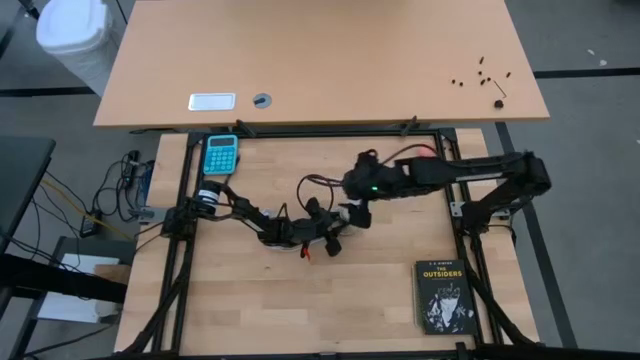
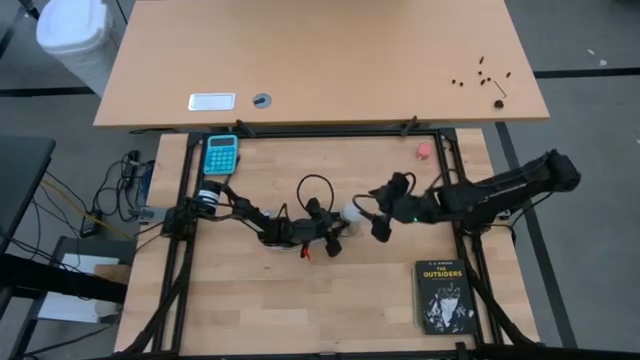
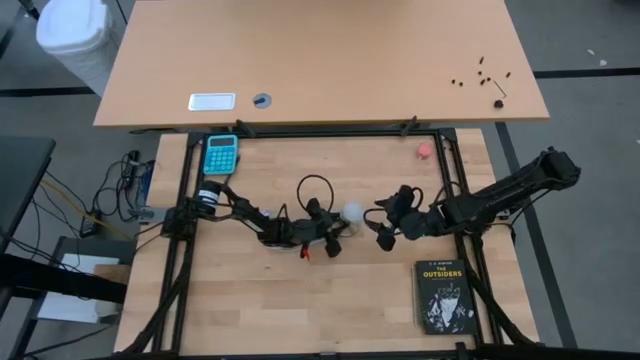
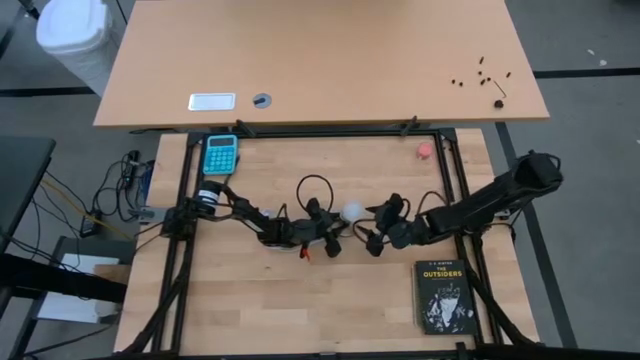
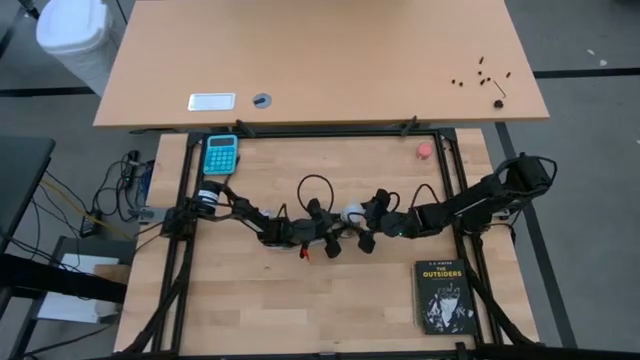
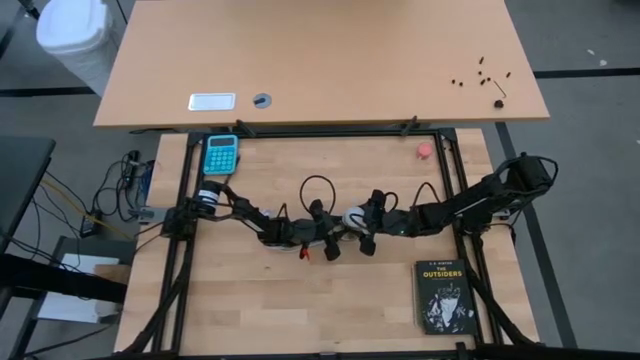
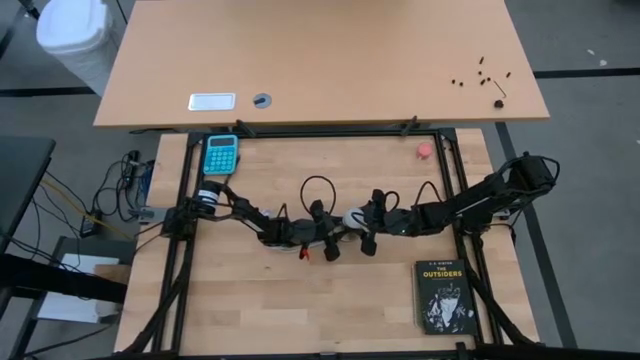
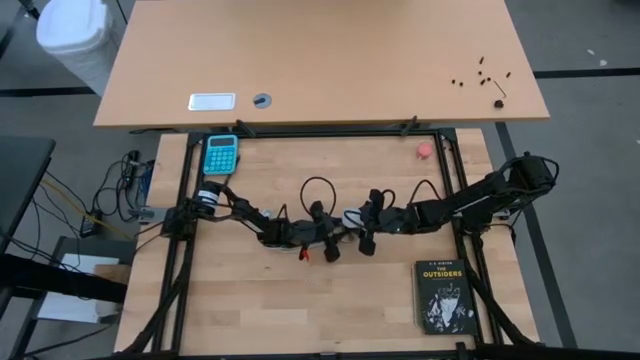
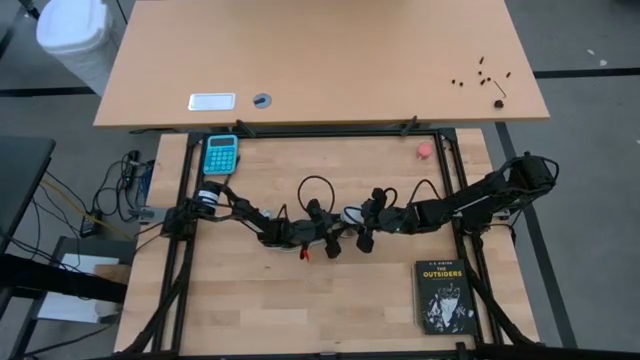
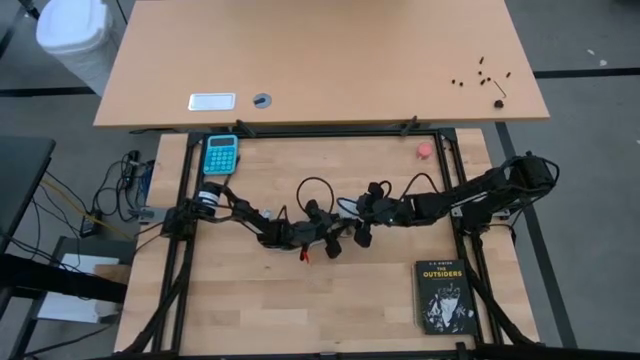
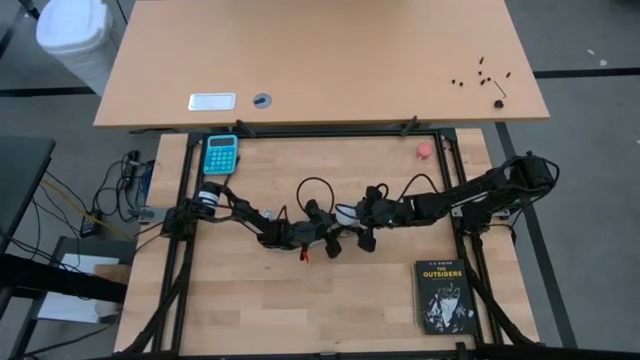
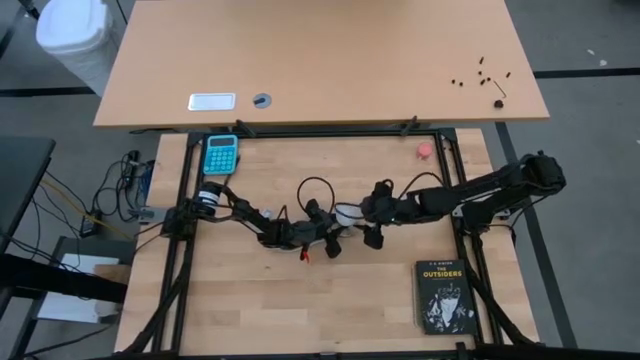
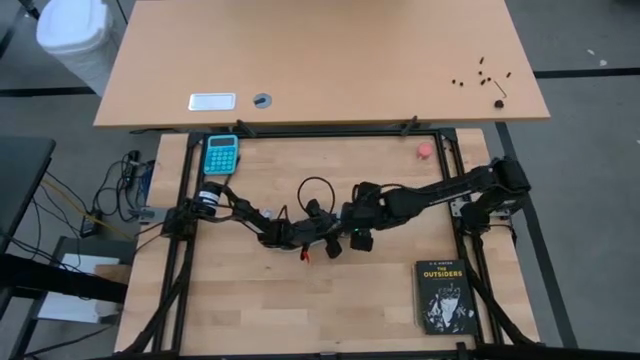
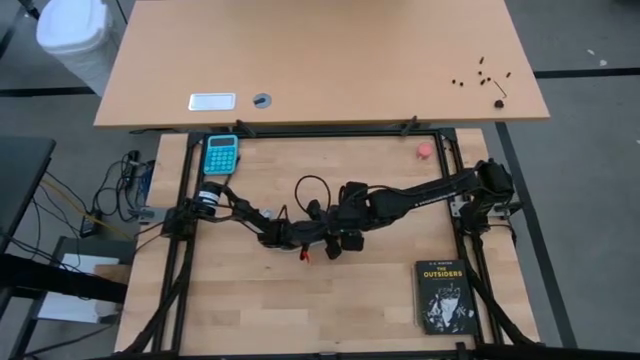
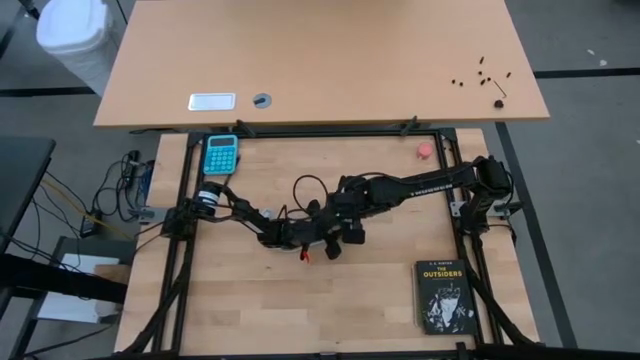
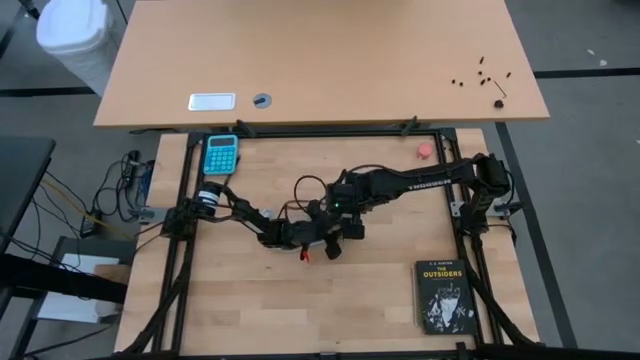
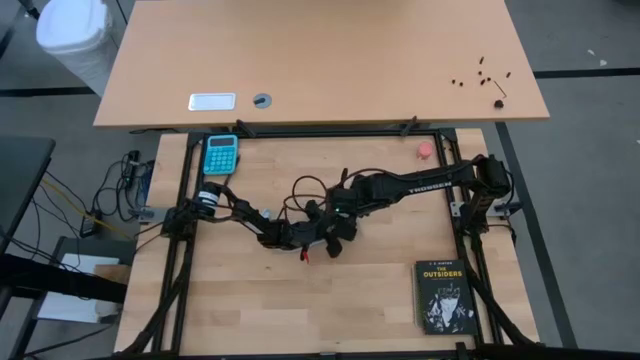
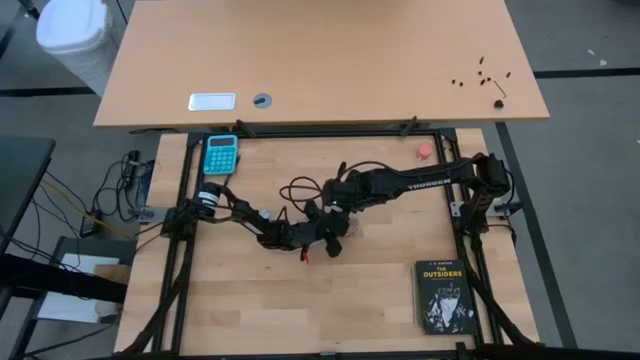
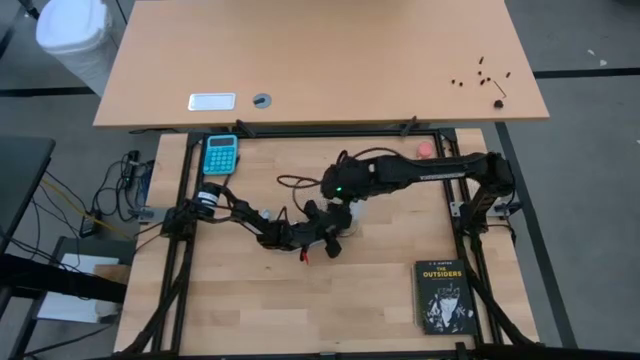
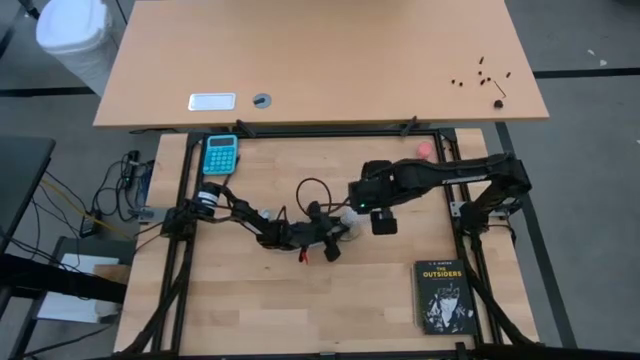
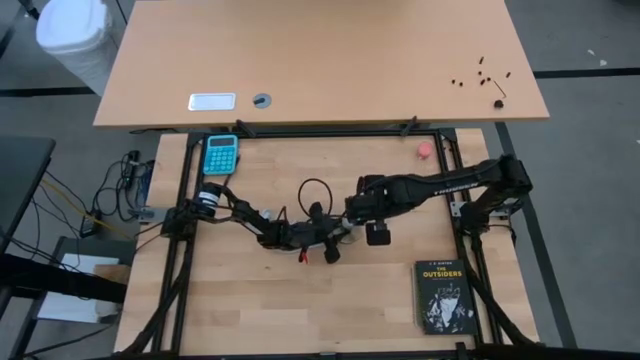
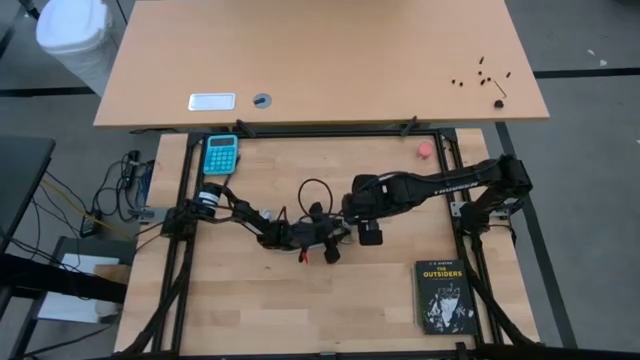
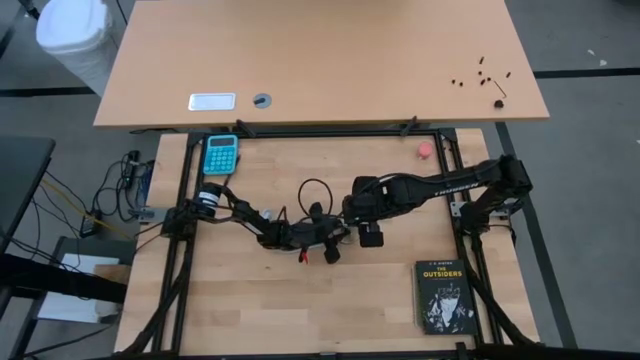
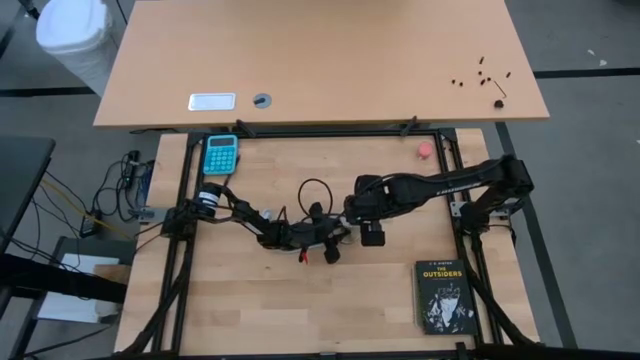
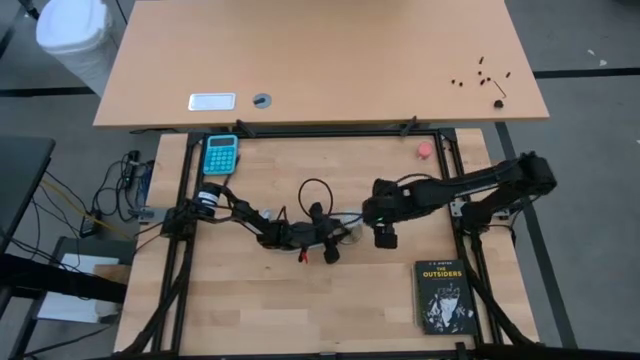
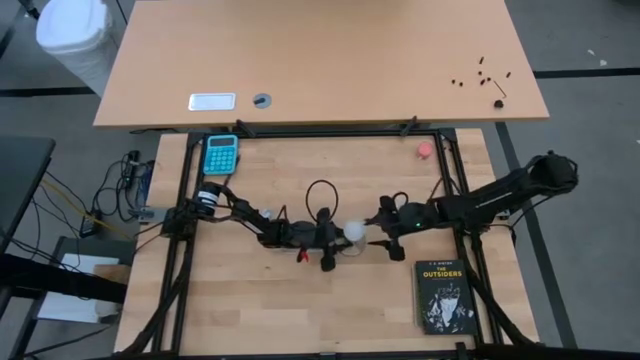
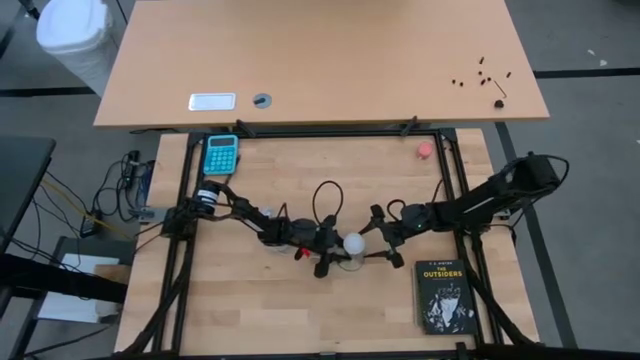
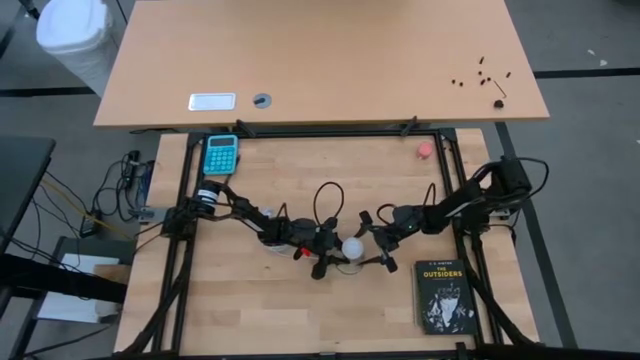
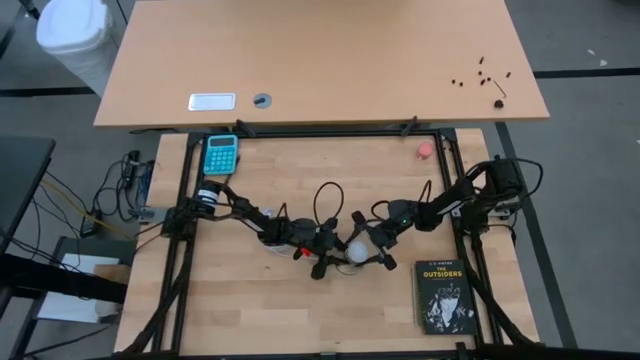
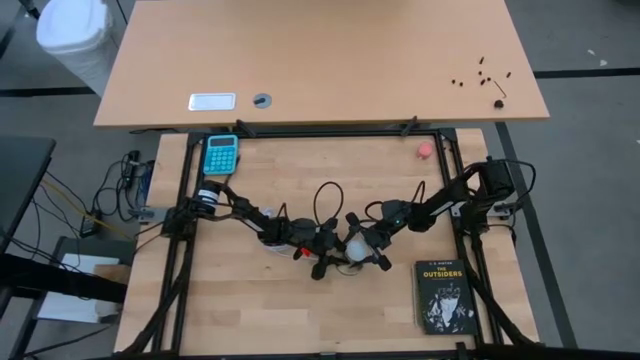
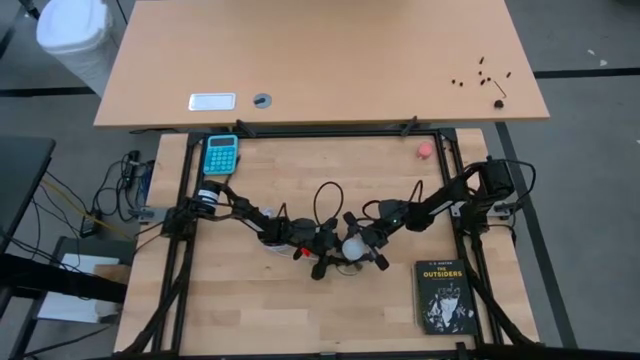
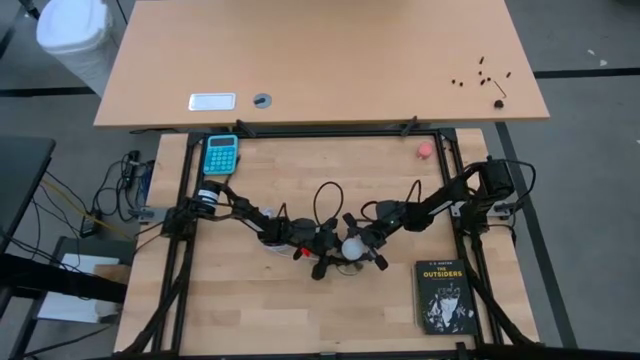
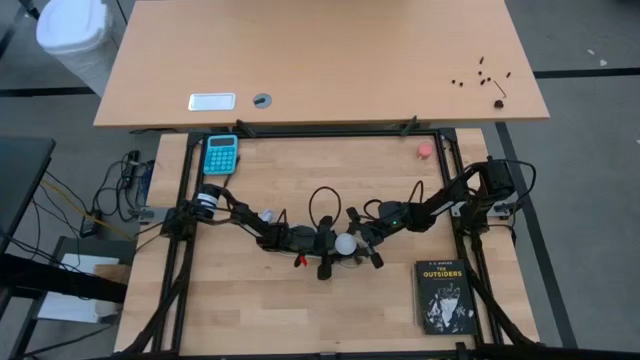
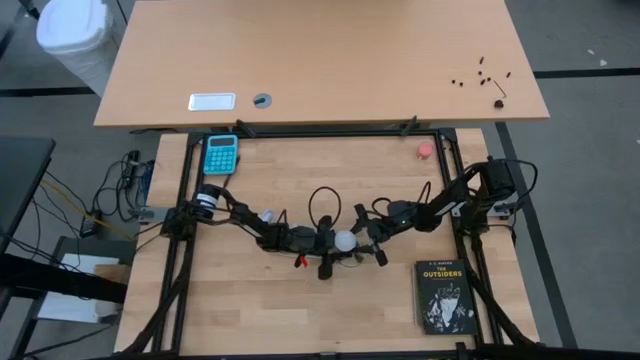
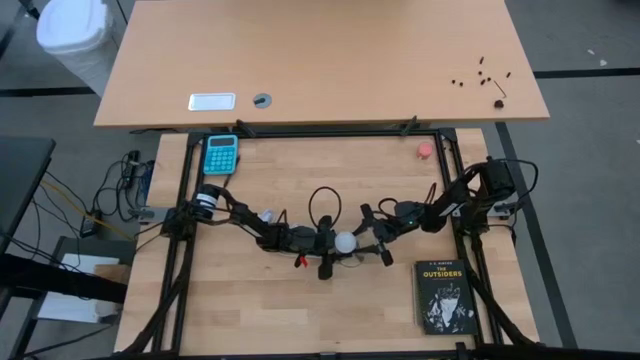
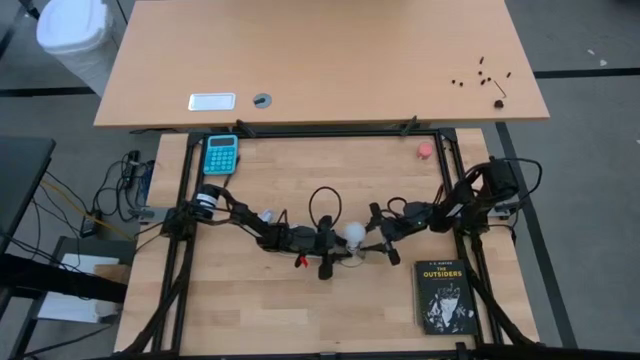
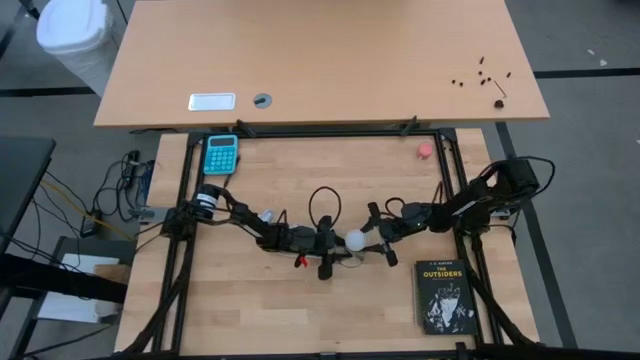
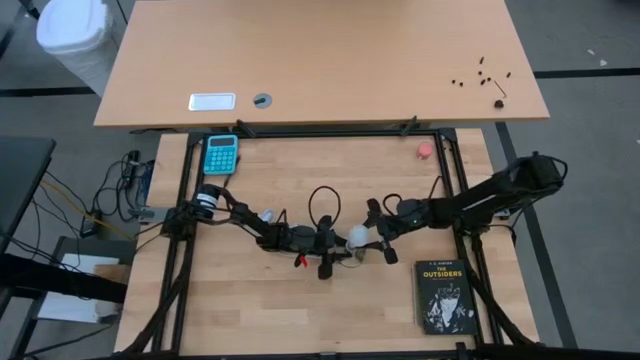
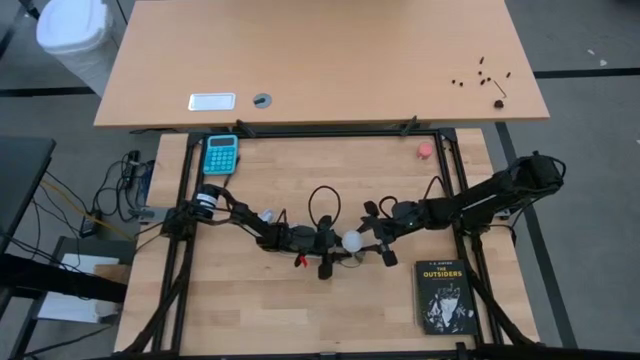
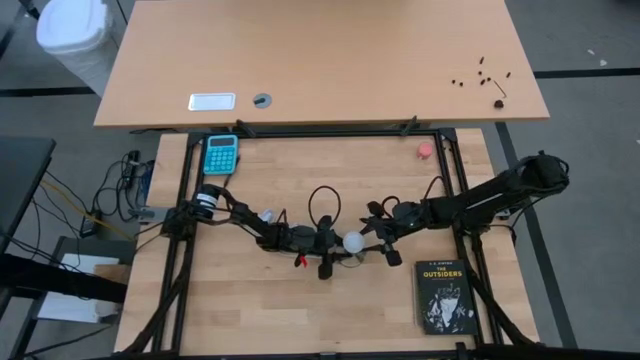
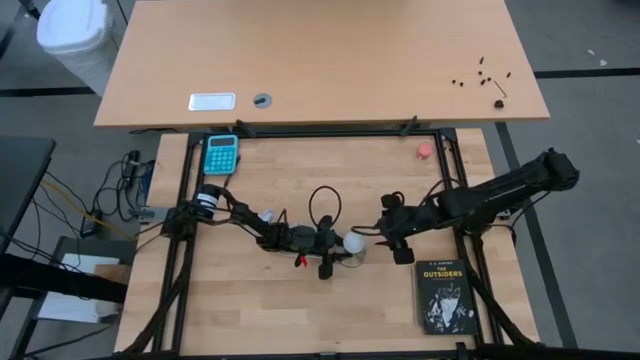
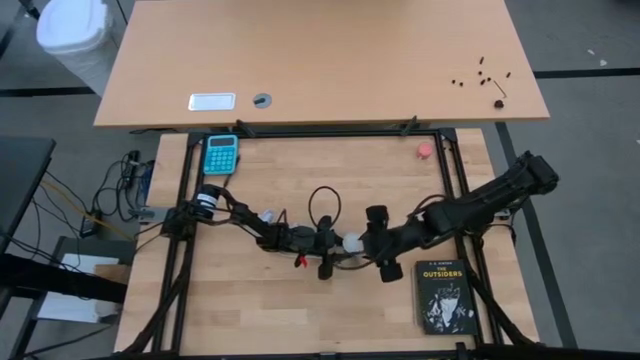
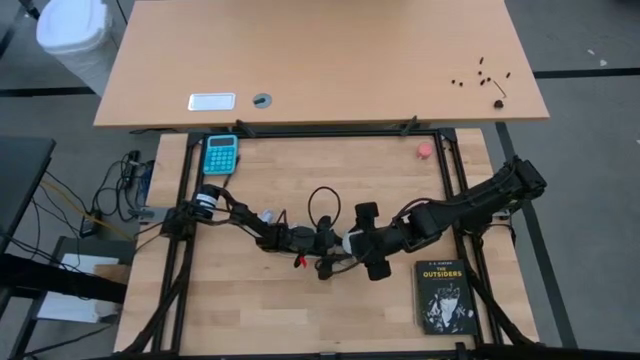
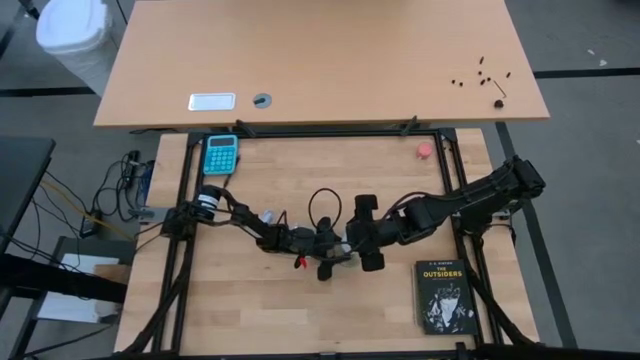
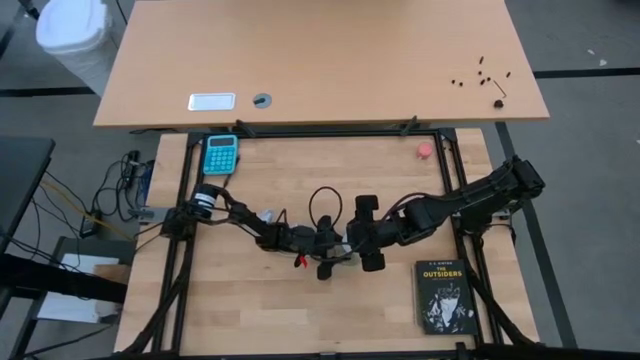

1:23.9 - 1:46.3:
Task: Screw lightbulb
Insert the lightbulb into the lamp
